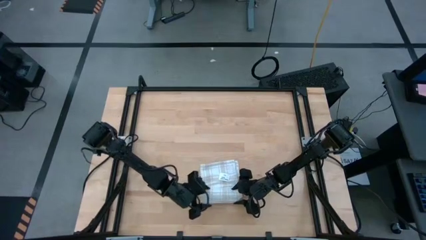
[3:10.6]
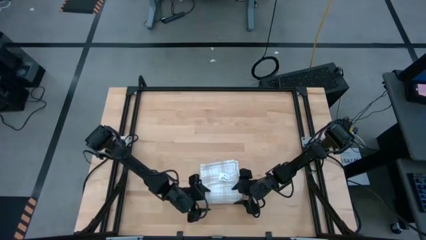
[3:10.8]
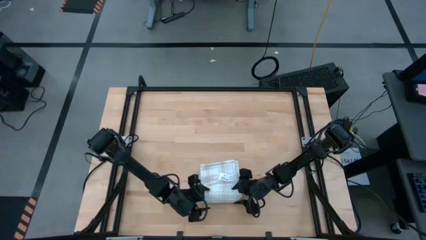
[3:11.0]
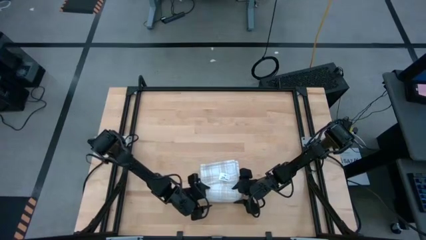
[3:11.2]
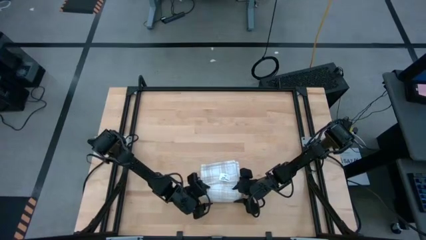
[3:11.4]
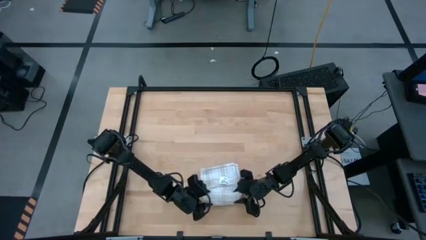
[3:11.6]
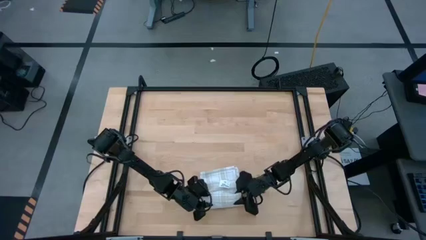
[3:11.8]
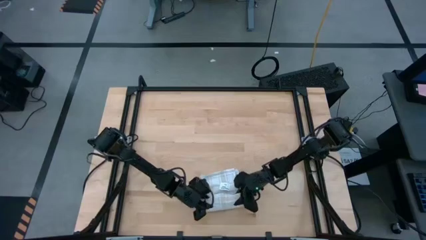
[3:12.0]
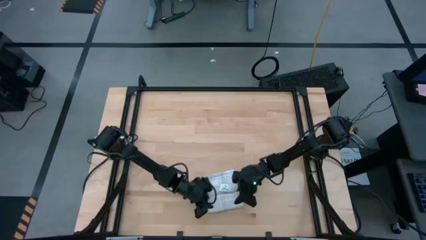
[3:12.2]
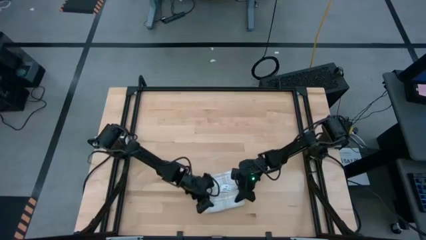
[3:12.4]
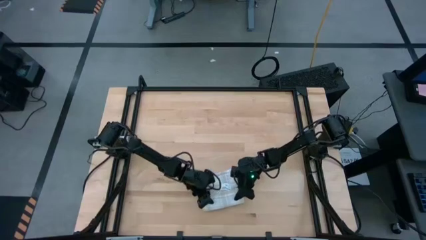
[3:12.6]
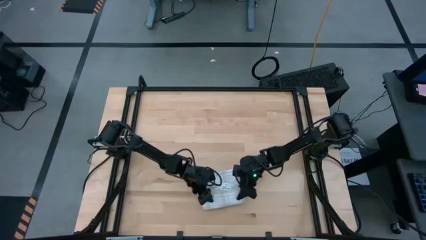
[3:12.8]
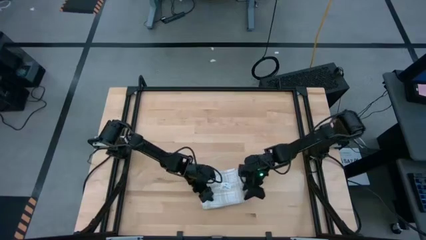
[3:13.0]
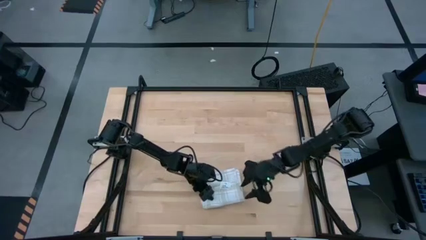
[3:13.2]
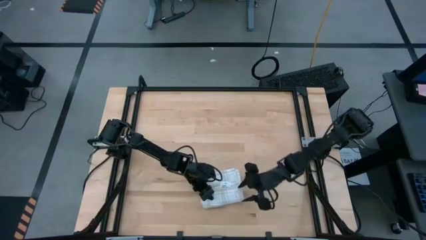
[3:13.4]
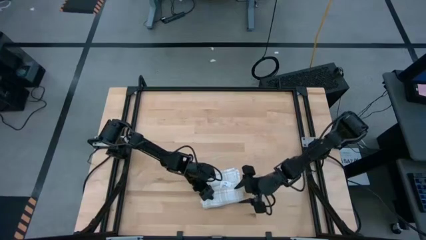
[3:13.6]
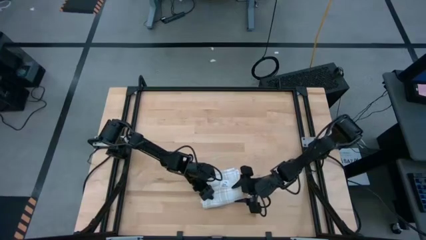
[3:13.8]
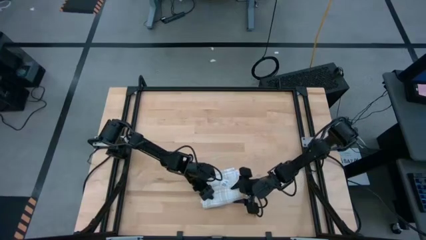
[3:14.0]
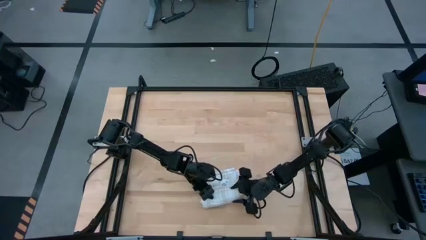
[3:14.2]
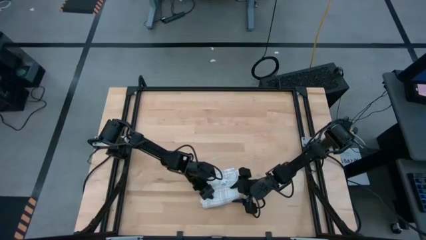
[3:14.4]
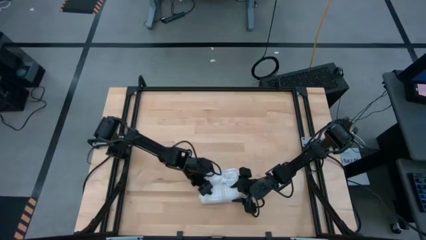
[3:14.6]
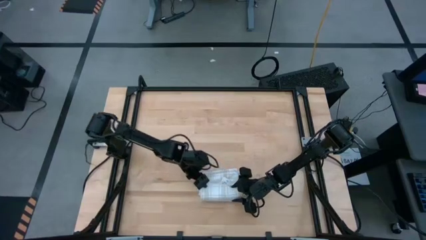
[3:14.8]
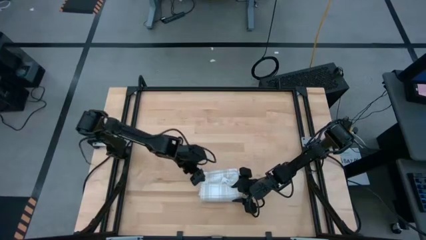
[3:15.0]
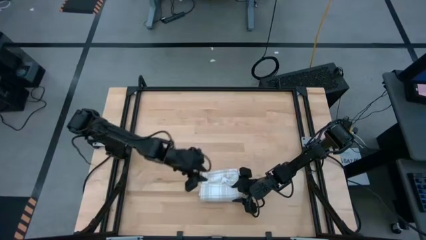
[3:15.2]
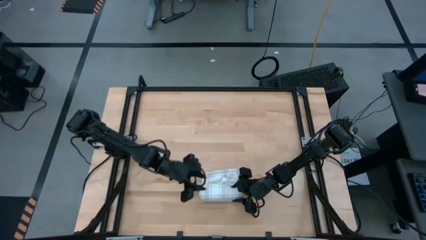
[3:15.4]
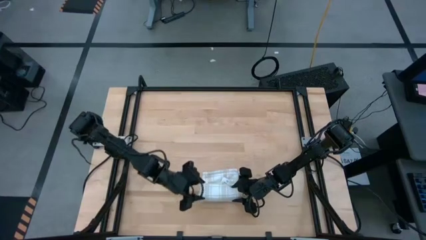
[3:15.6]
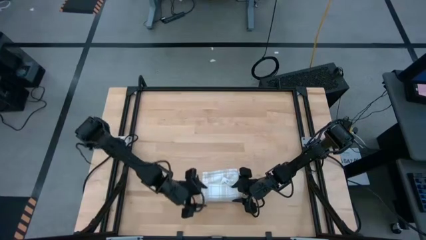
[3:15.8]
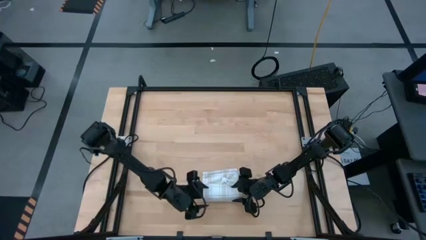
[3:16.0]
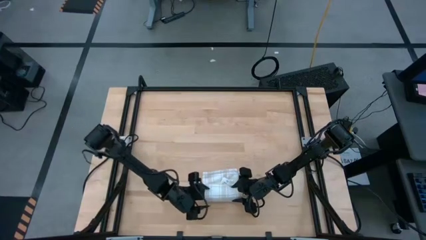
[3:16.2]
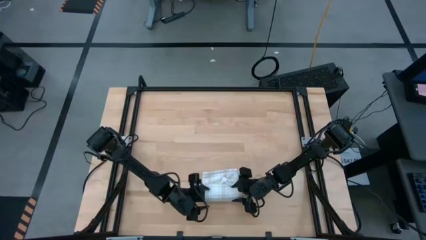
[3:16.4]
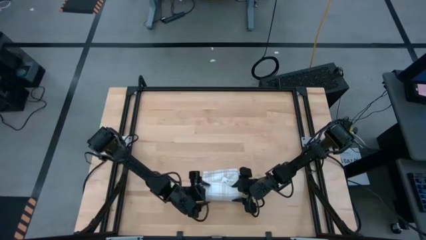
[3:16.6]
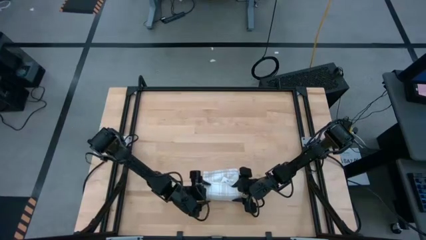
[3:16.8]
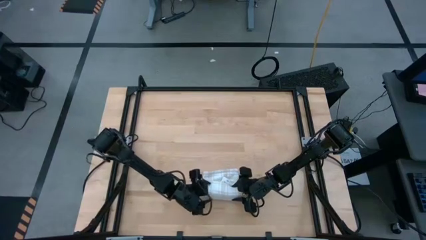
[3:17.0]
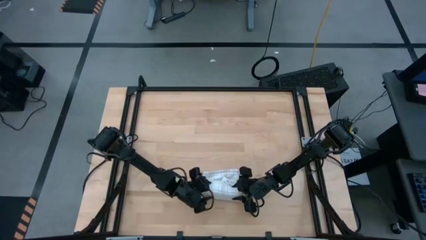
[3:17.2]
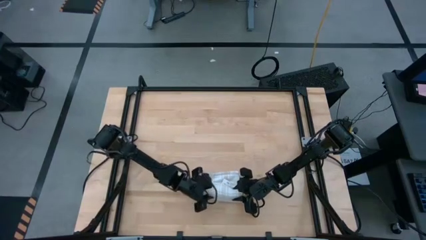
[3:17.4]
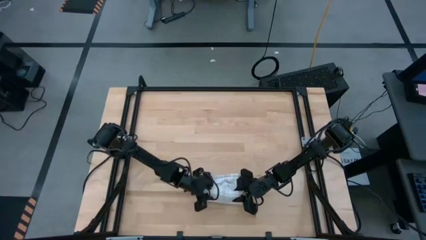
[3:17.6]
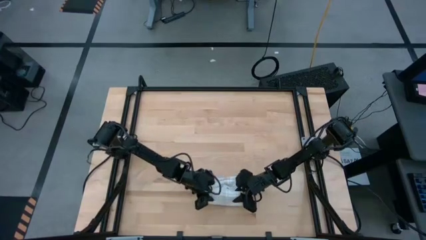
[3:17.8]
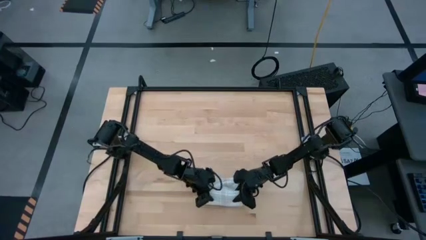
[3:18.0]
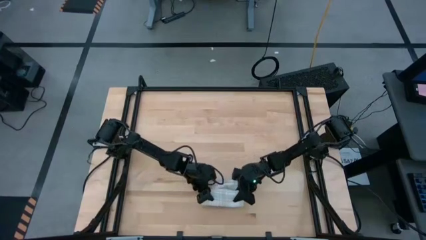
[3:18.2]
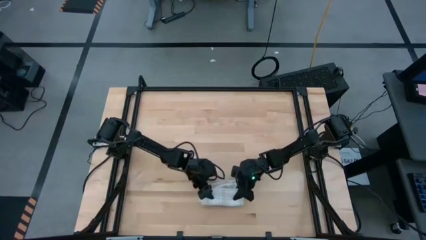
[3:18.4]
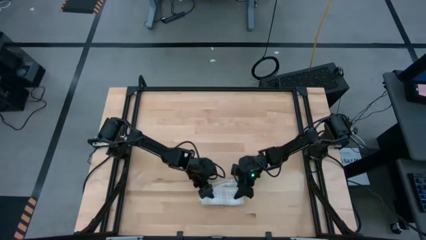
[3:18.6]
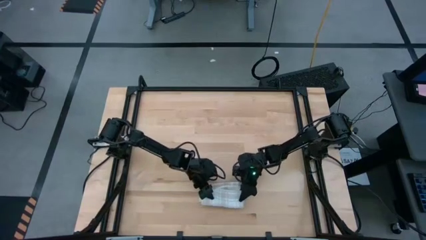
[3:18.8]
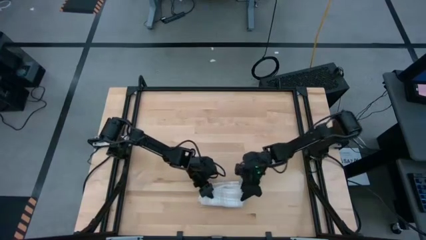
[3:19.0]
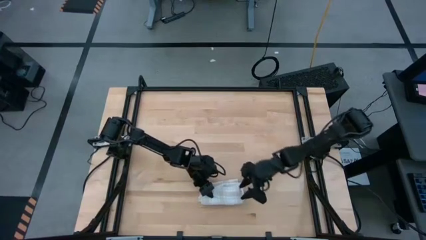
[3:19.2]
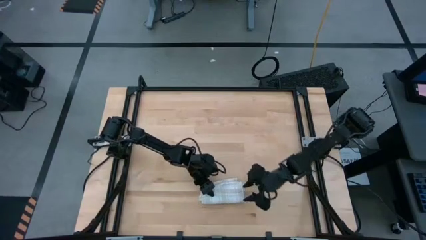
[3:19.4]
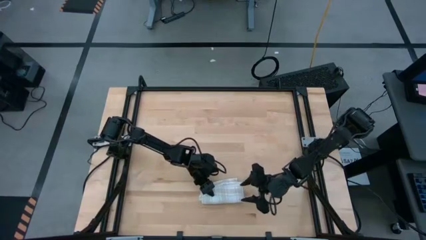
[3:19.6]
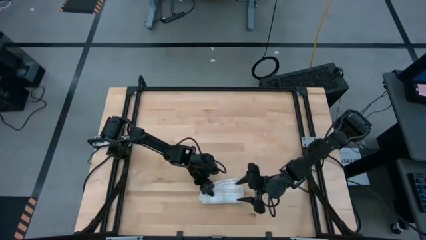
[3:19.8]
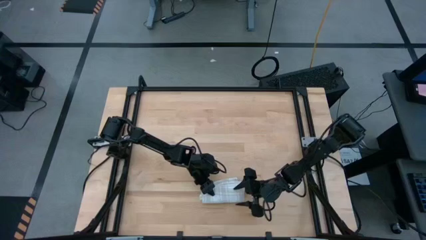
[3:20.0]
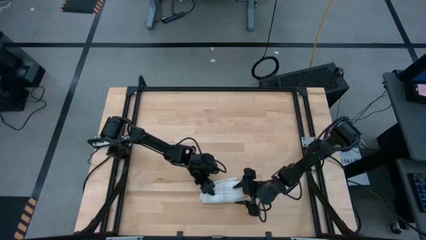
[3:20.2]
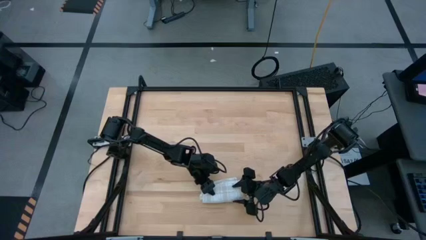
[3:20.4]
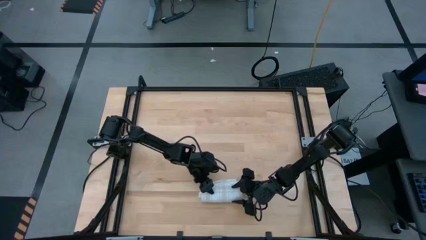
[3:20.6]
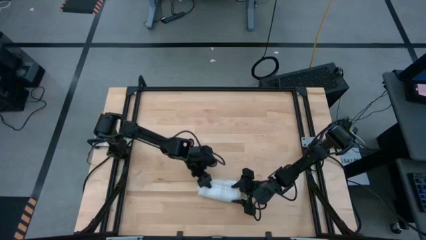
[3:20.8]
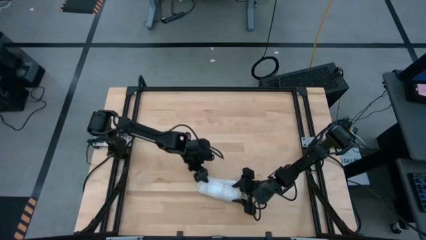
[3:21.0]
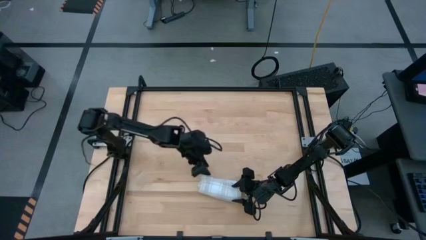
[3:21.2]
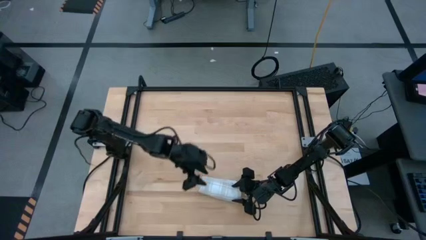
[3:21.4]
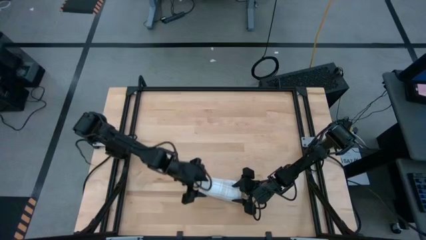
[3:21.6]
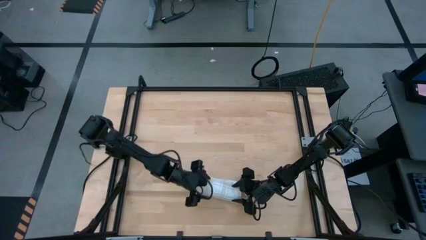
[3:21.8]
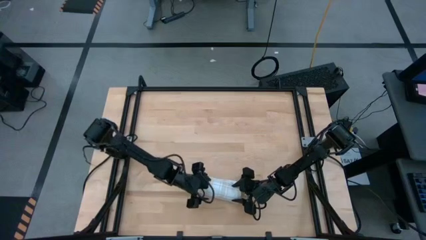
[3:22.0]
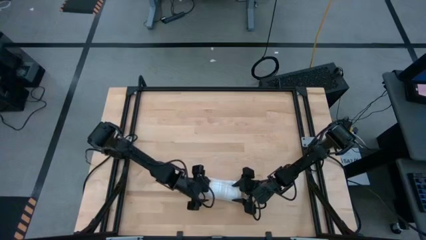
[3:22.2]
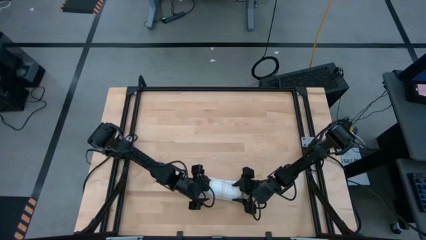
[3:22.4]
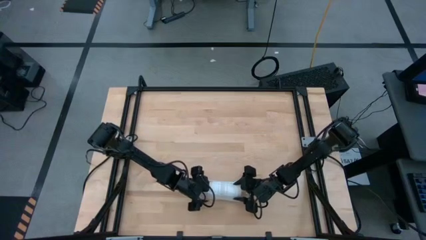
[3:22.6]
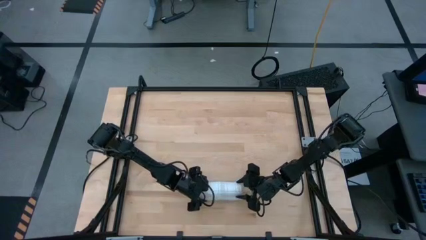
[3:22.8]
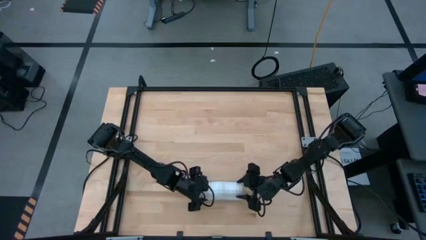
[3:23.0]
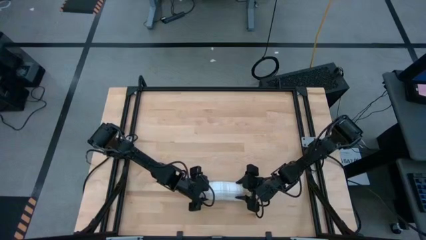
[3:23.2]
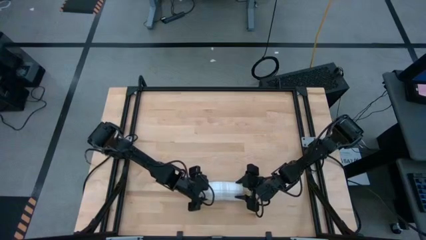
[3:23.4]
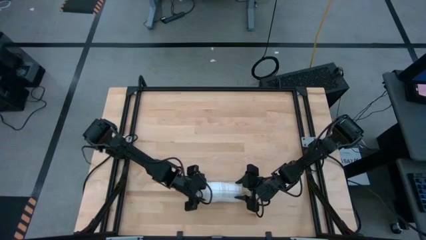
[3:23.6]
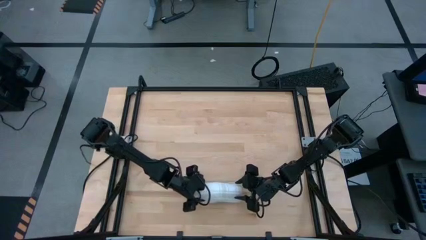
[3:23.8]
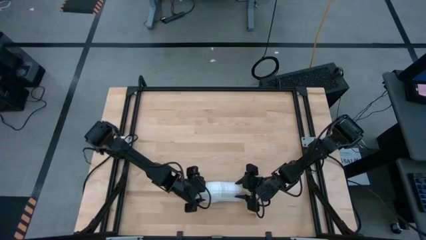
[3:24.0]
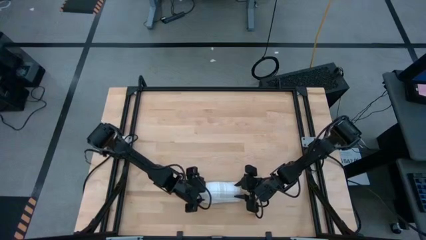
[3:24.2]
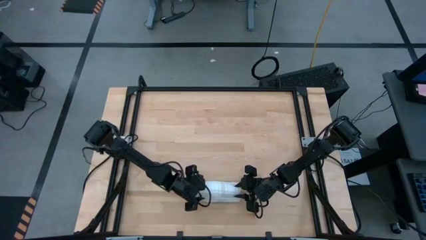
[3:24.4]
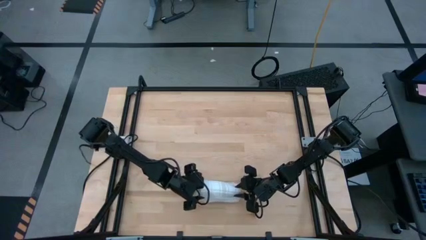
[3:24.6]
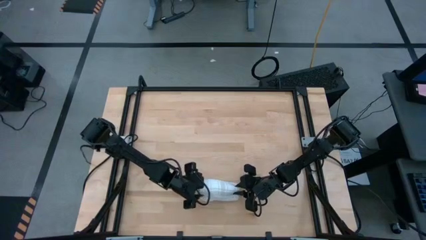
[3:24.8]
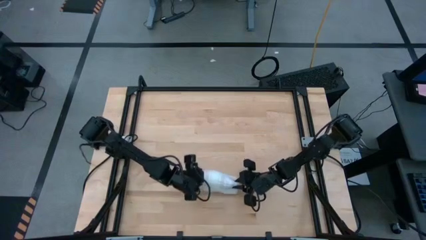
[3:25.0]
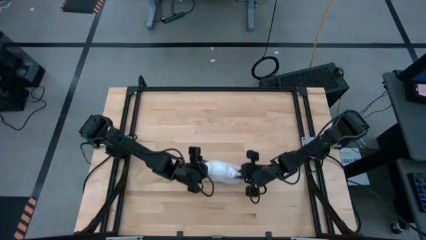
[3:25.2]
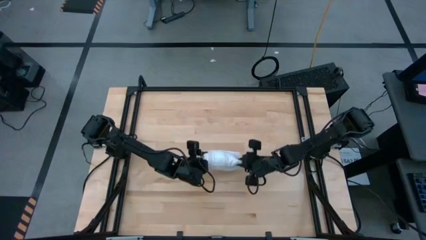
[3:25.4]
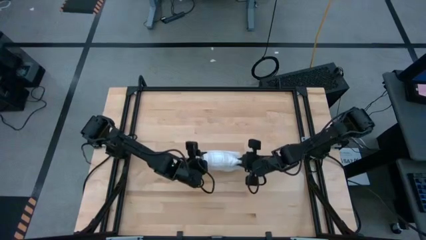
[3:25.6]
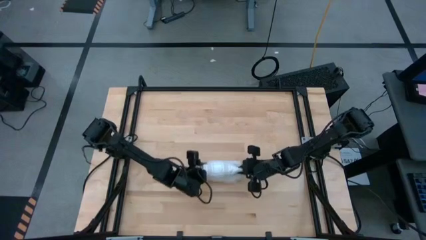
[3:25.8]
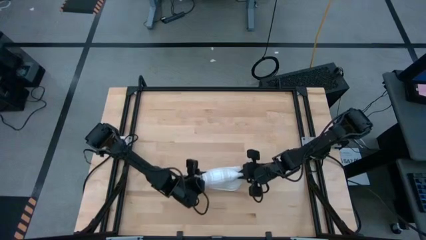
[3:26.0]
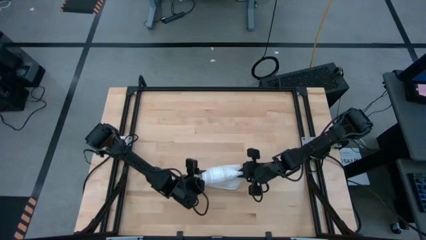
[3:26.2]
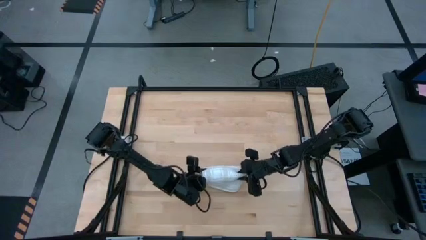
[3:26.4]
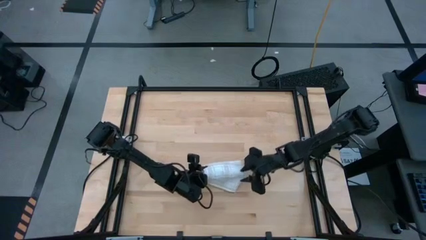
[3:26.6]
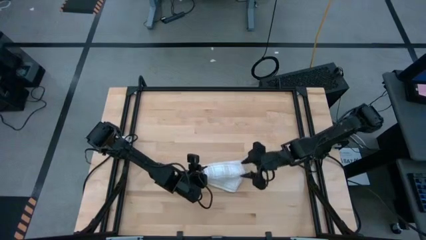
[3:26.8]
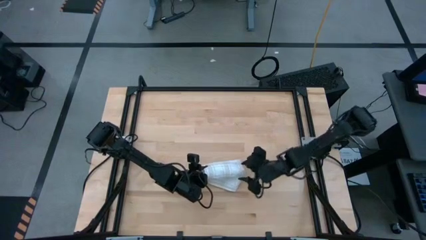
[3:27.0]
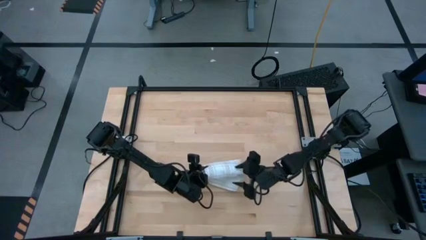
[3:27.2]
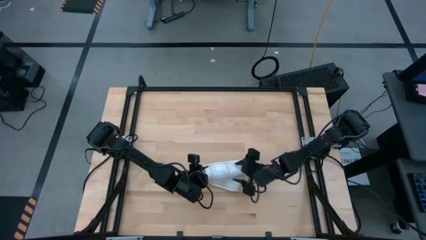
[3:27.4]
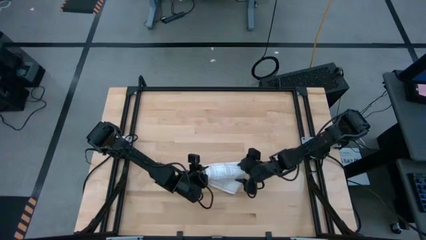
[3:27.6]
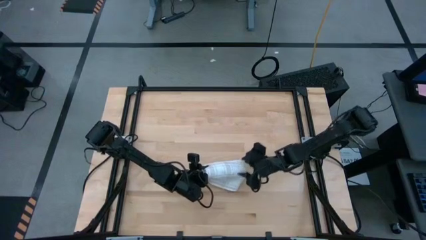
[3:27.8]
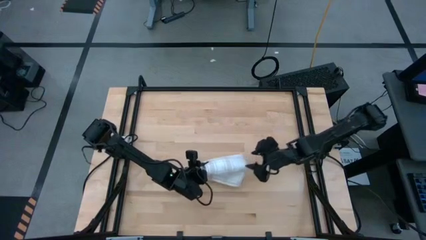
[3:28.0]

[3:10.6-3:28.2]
Task: Roll towel
Roll the towel
